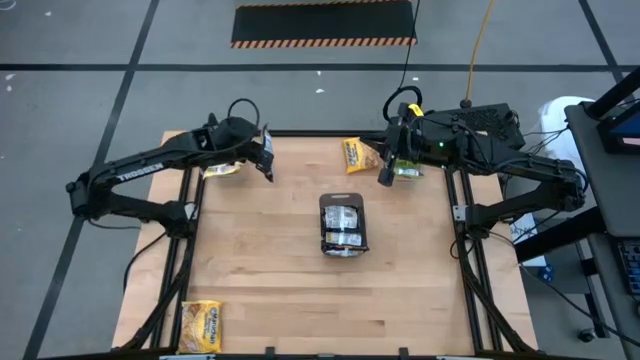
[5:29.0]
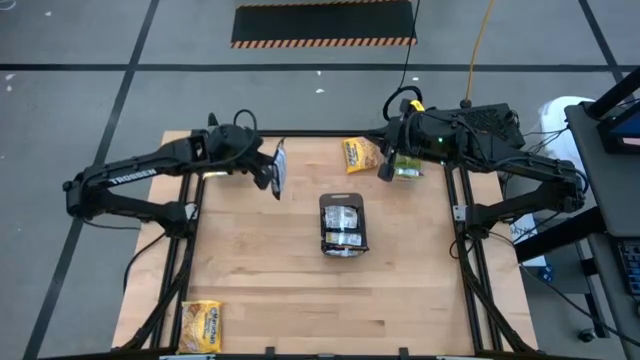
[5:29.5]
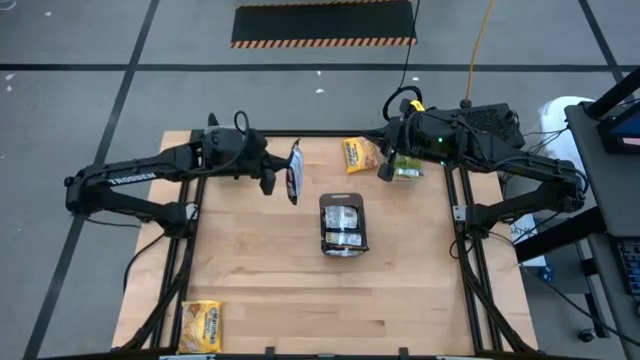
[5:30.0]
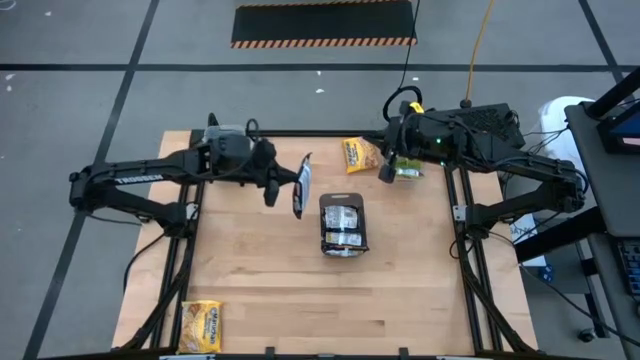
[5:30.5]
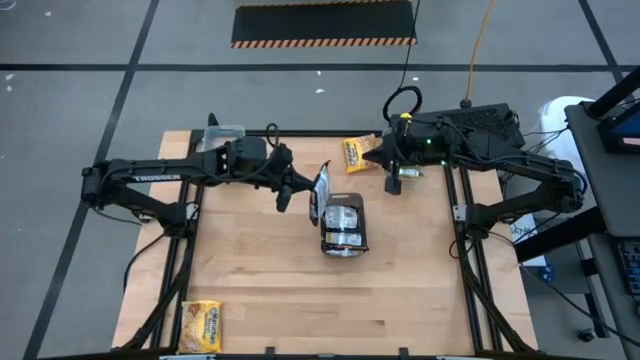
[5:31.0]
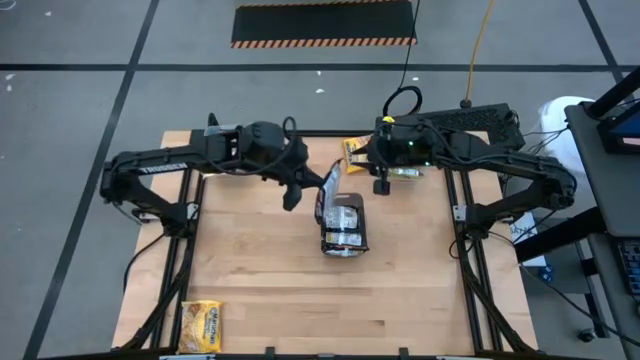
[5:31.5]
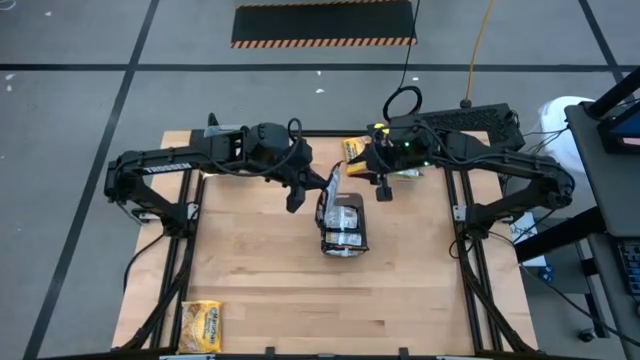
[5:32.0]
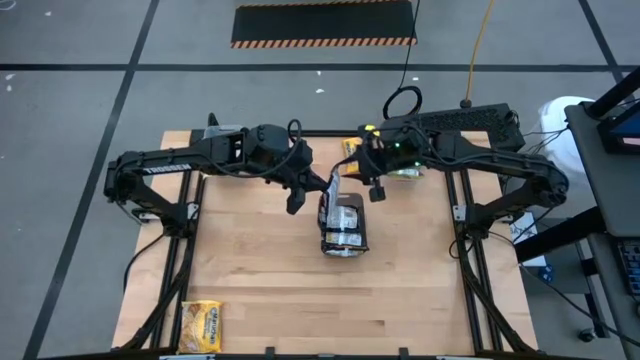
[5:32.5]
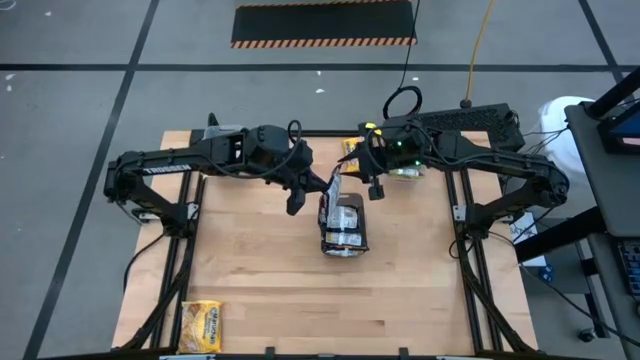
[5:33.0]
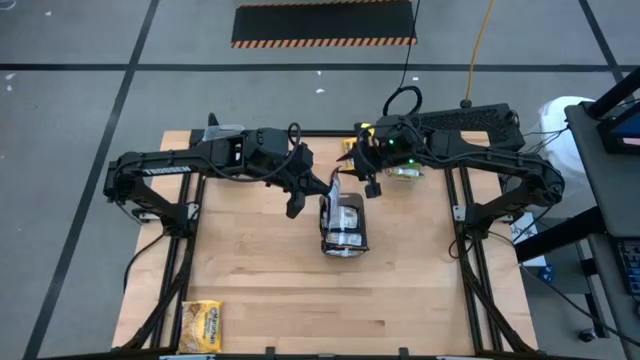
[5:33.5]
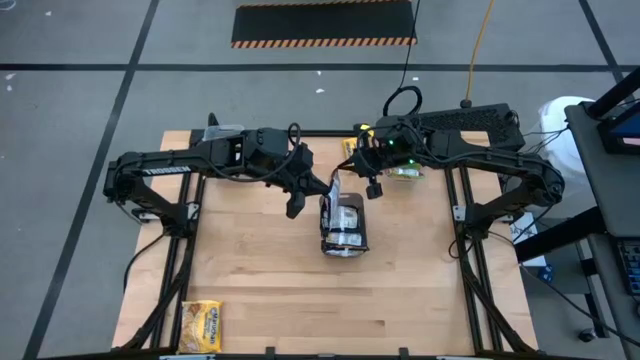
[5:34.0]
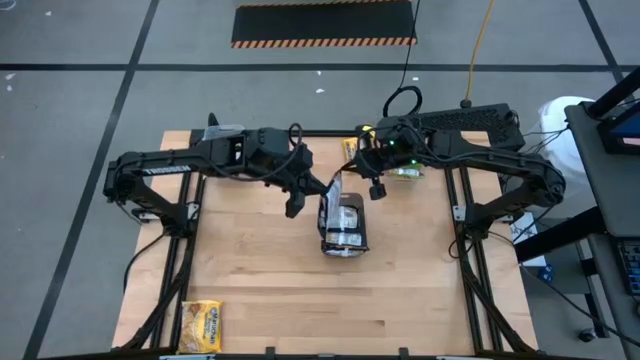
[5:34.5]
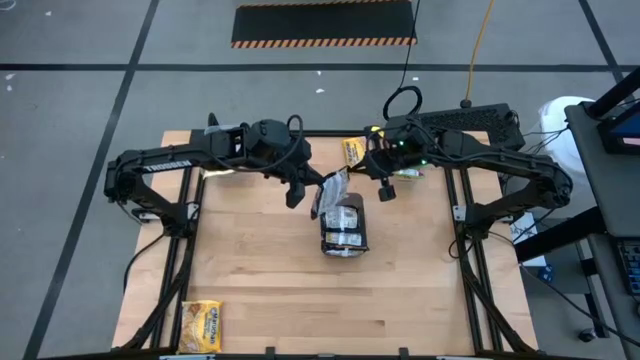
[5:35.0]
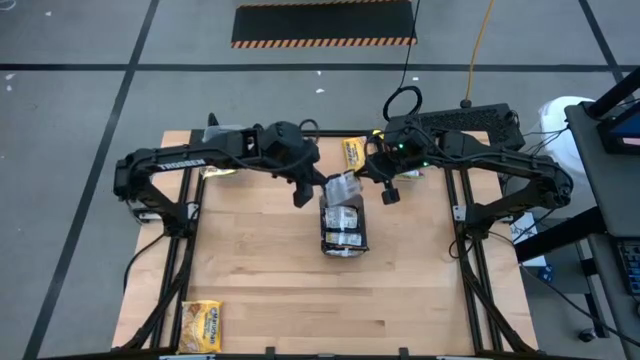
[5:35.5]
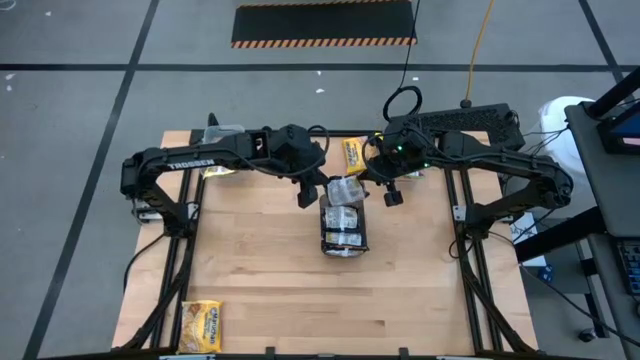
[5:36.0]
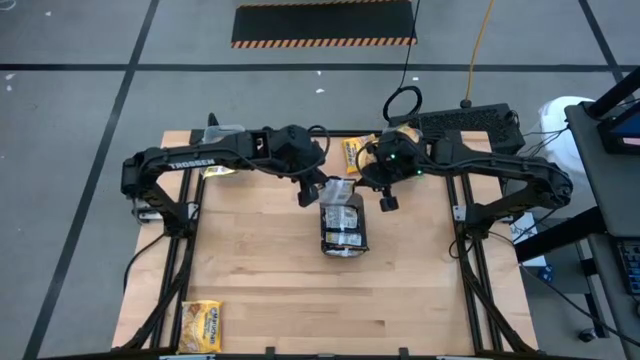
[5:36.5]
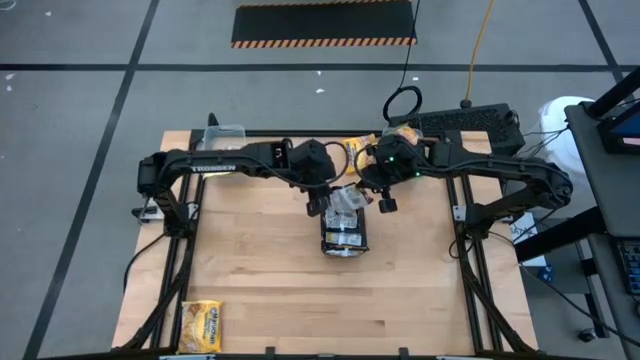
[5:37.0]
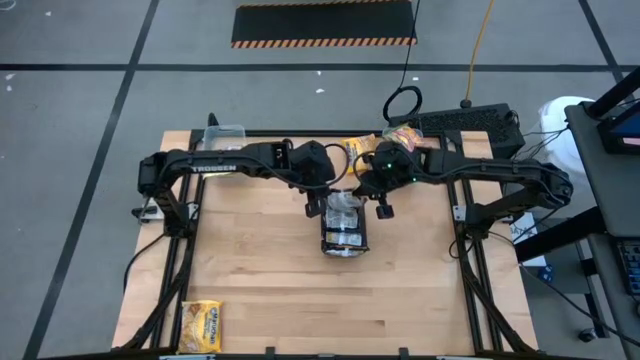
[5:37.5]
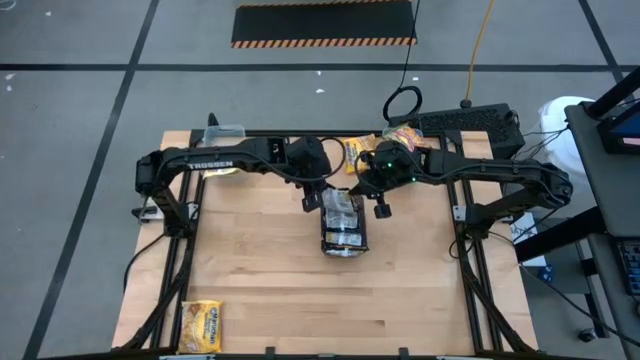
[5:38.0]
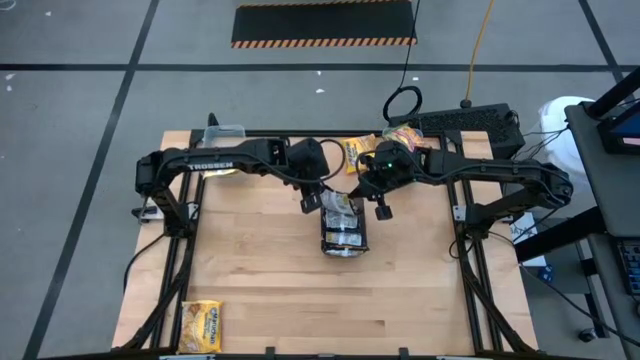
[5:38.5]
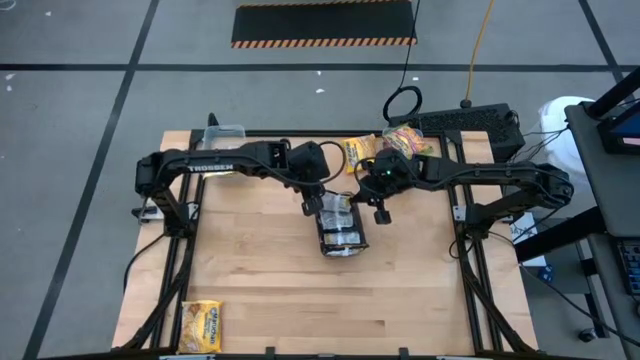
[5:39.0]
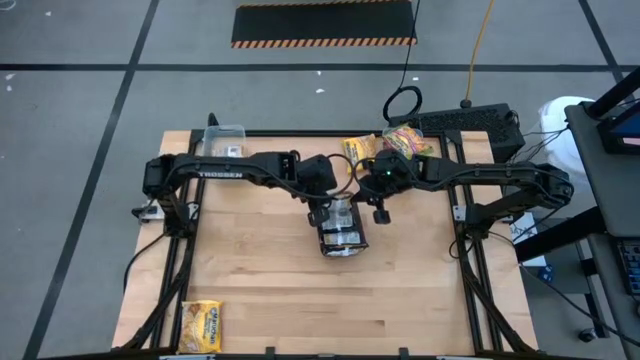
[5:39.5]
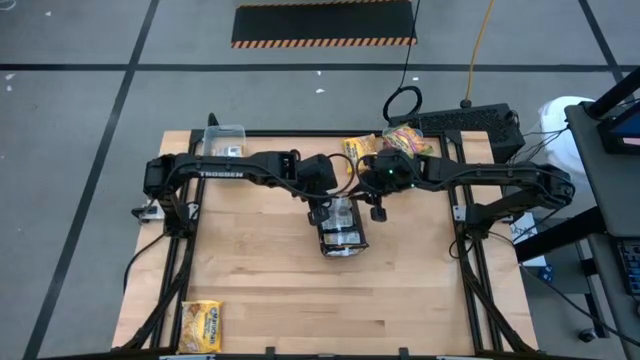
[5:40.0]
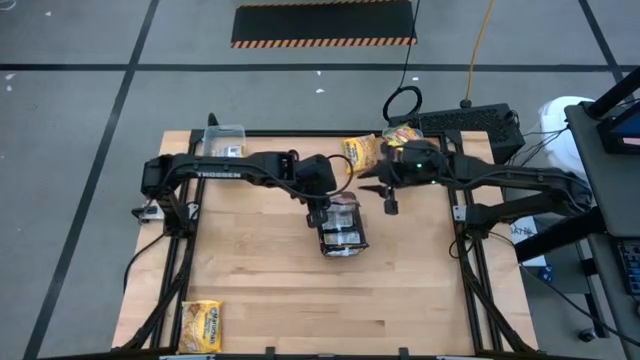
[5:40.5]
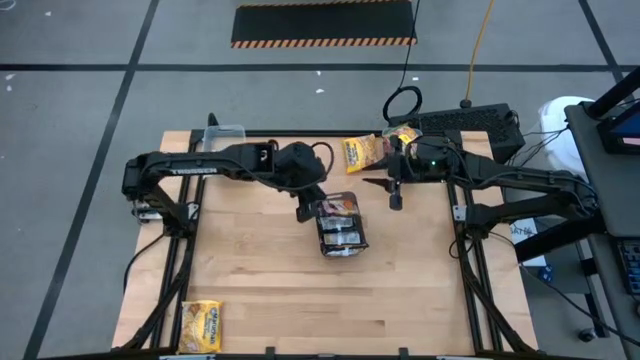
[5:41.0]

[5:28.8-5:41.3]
Task: Sort Maruchan noodles
Put the black noodle pack into the black bin

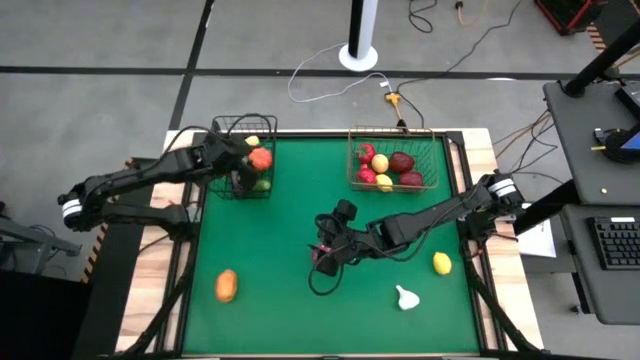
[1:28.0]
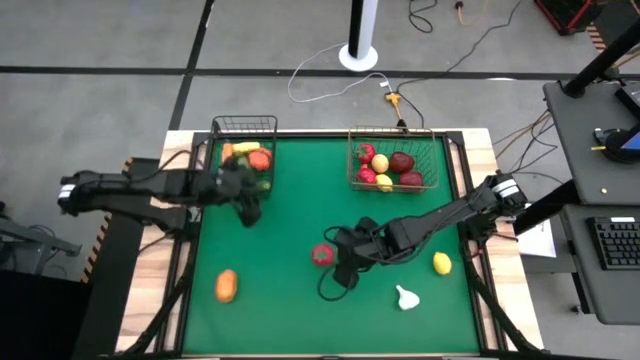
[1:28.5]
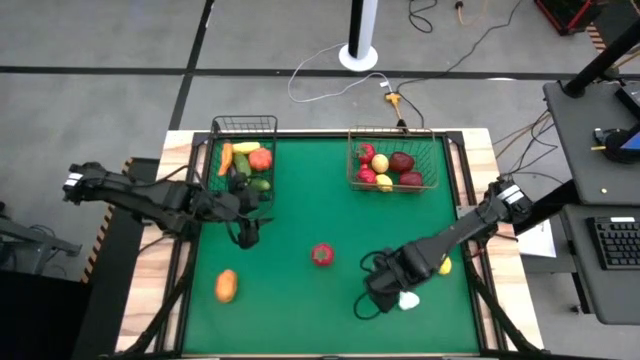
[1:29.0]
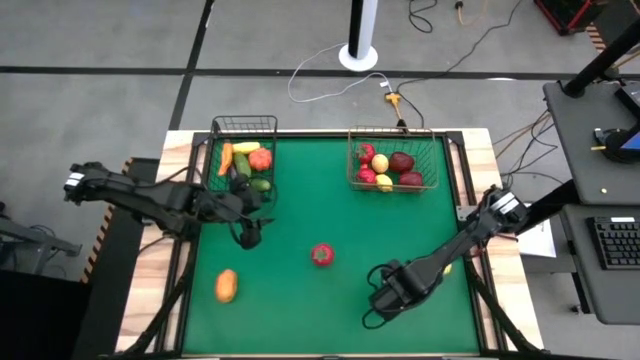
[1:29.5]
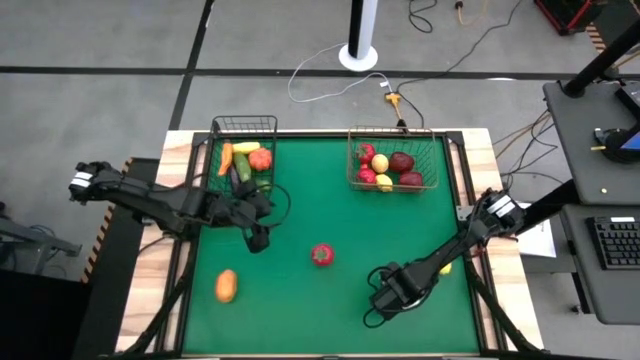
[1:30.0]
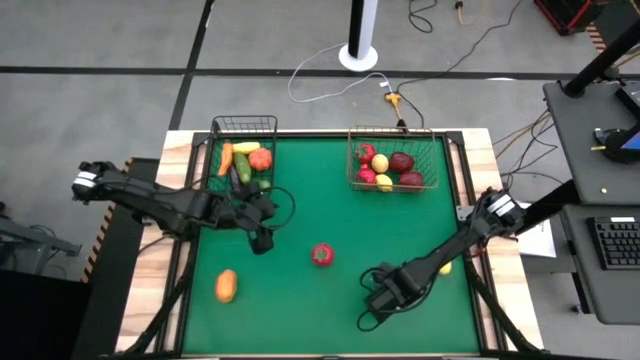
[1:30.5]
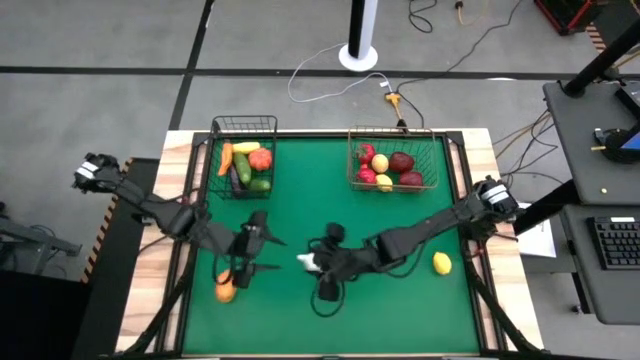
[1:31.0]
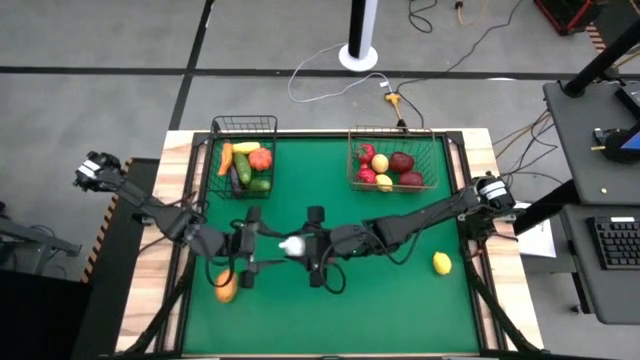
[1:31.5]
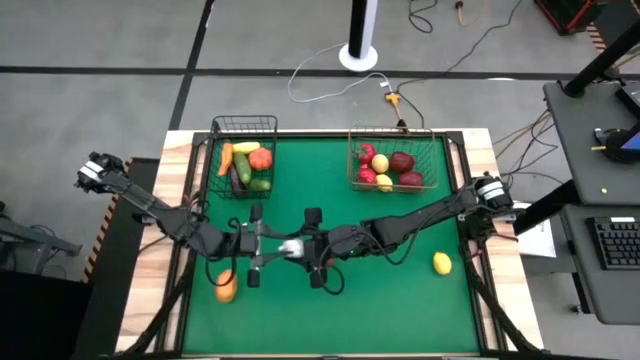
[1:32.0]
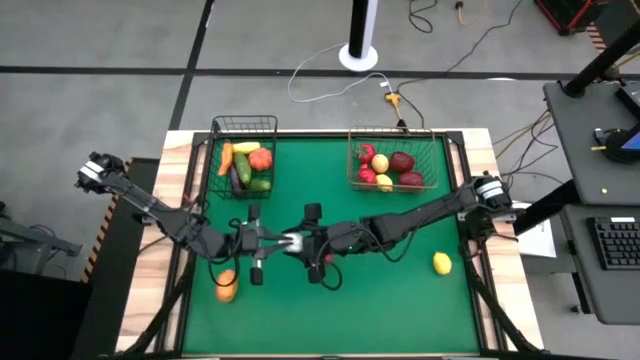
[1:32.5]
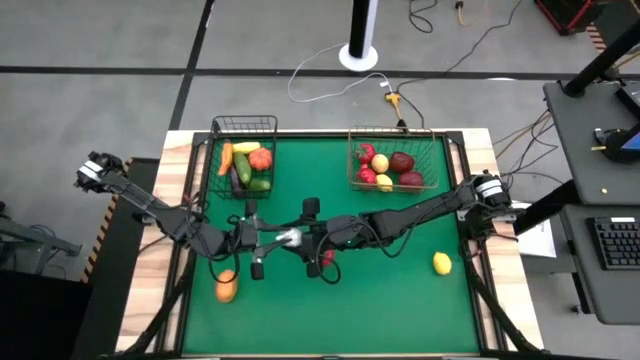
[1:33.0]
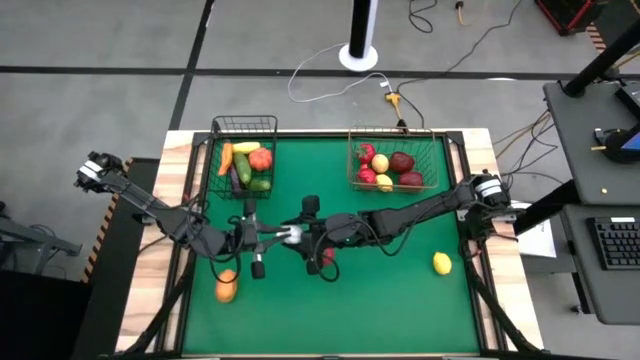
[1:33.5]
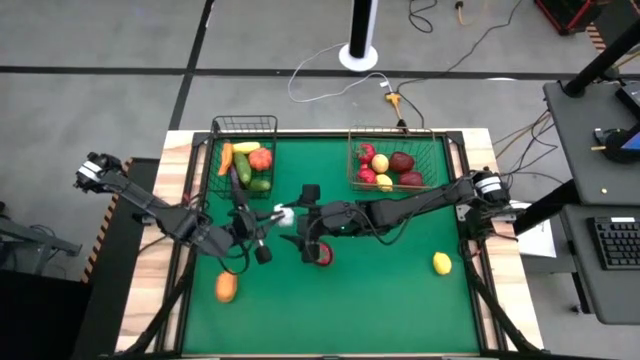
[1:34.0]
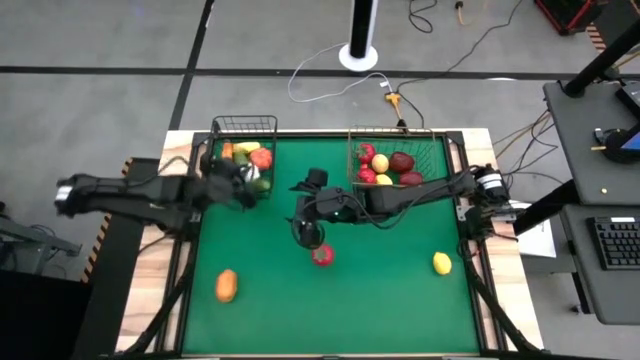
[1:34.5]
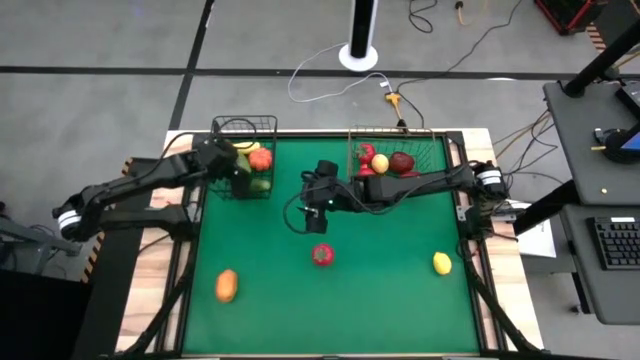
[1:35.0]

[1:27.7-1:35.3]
Task: Sort produce into baskets
Put the white garlic into the left wire basket

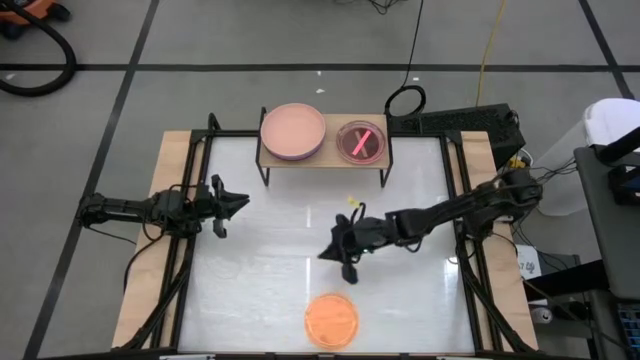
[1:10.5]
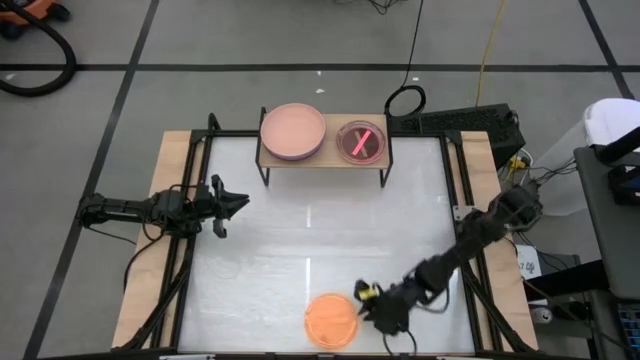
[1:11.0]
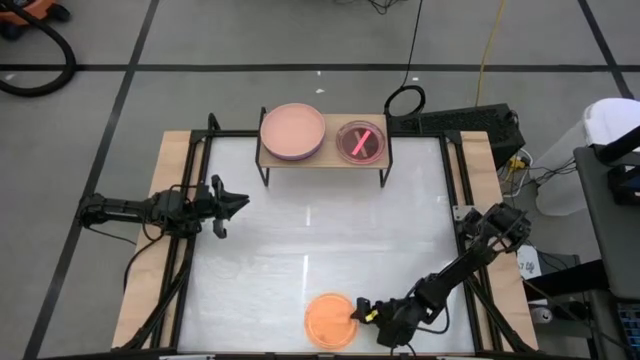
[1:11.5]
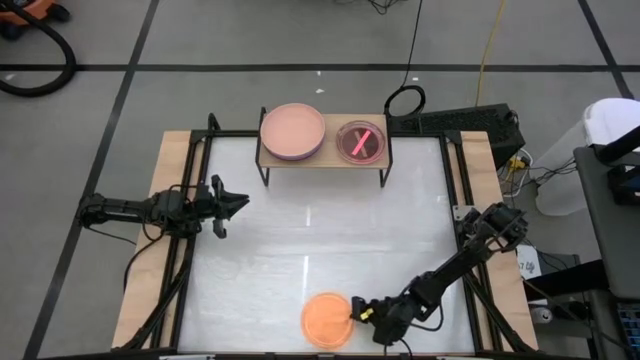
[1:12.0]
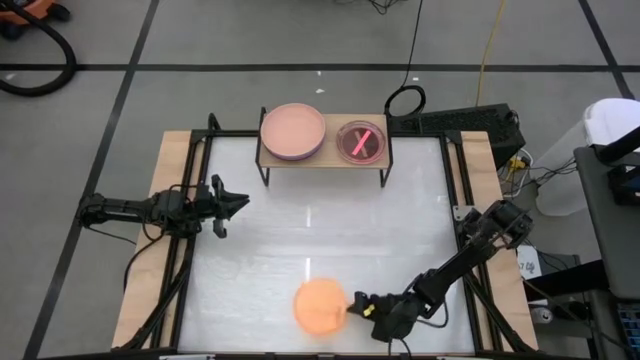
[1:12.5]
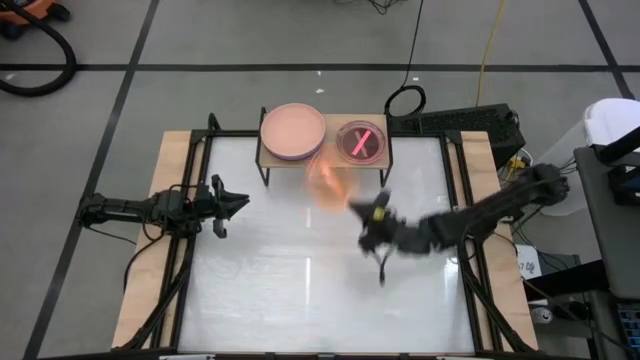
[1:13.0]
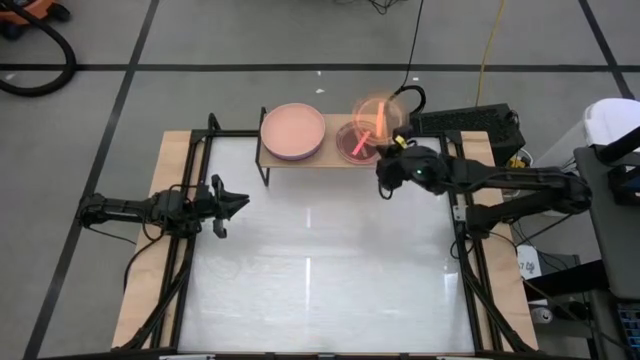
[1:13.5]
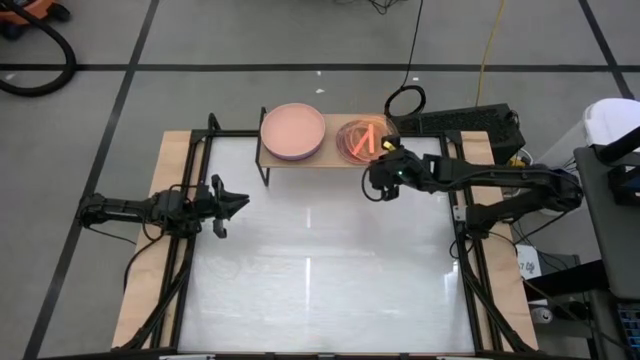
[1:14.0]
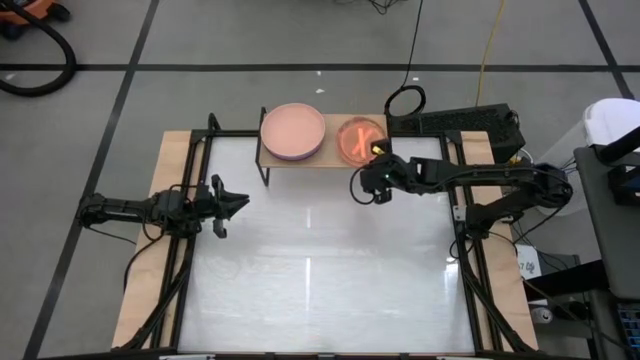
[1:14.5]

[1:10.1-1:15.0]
Task: Place and stack plates onto a shelf
Stack the transparent orange plate on top of the transparent pink plate on the shelf
